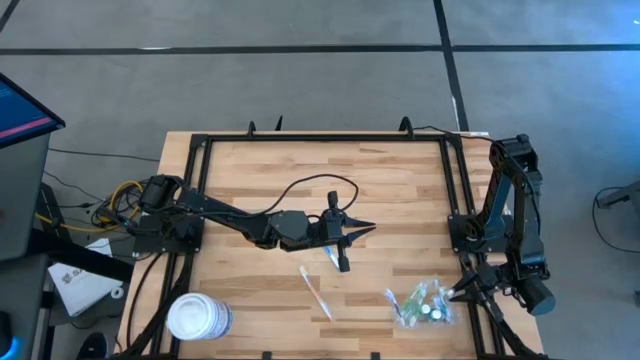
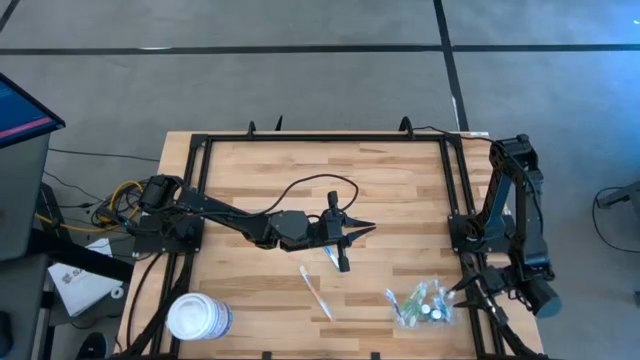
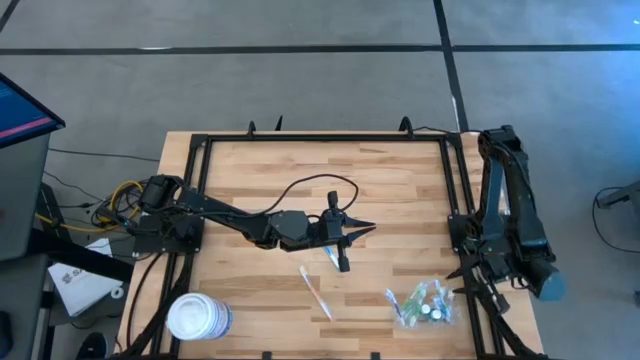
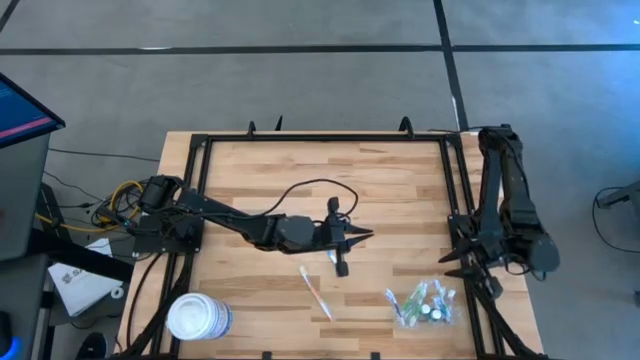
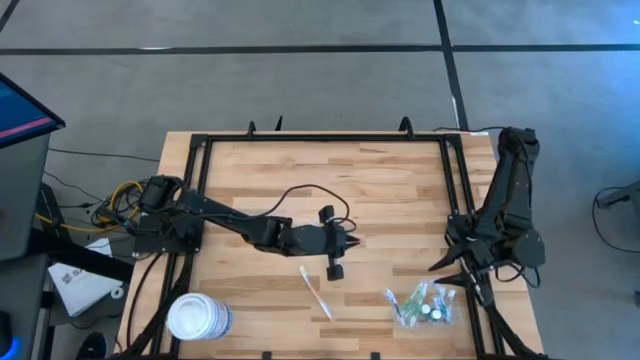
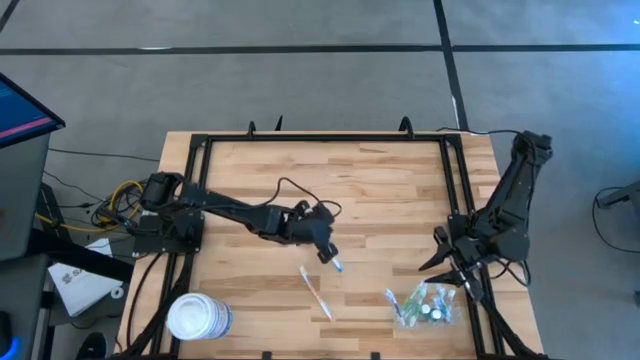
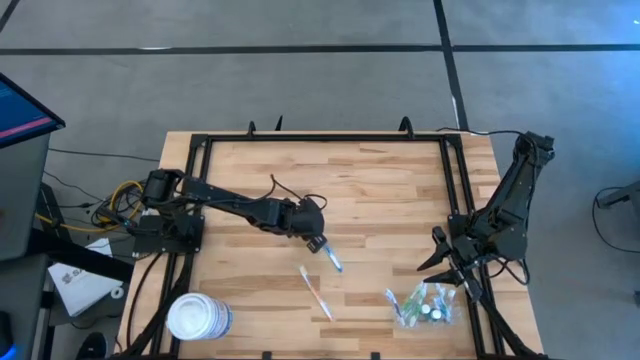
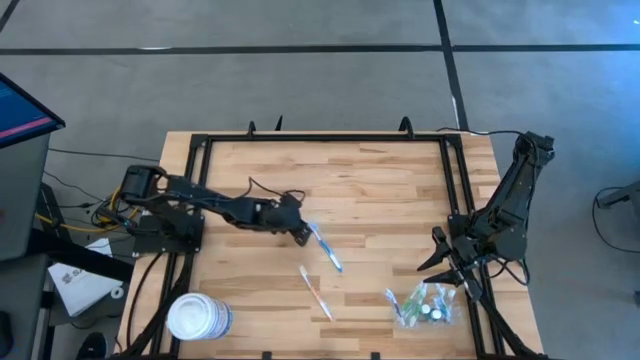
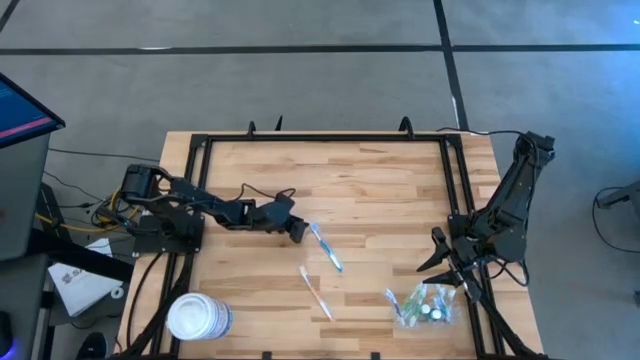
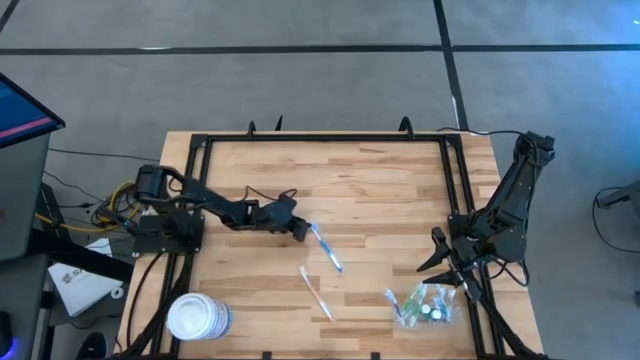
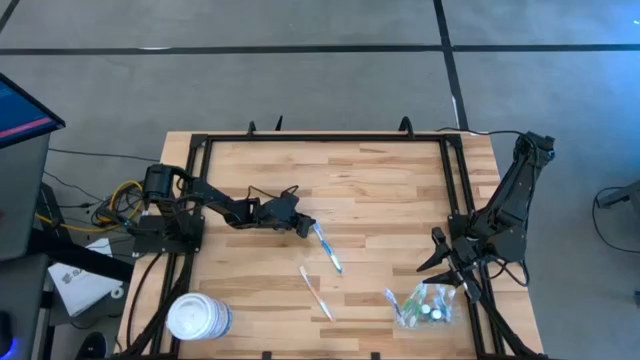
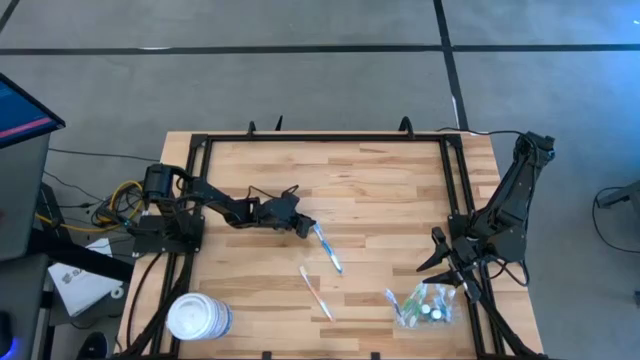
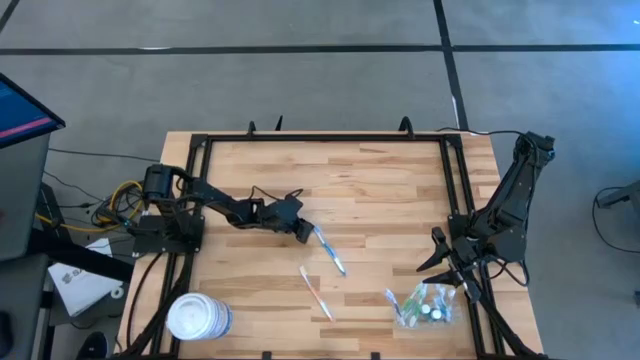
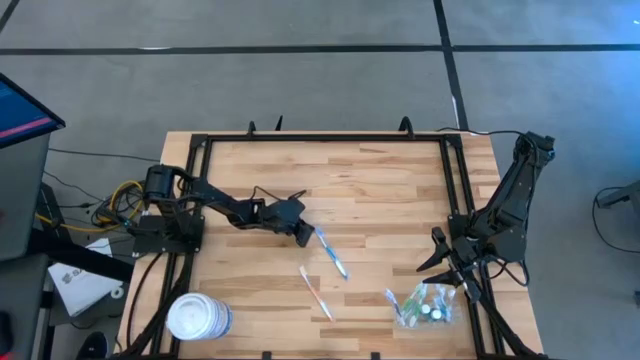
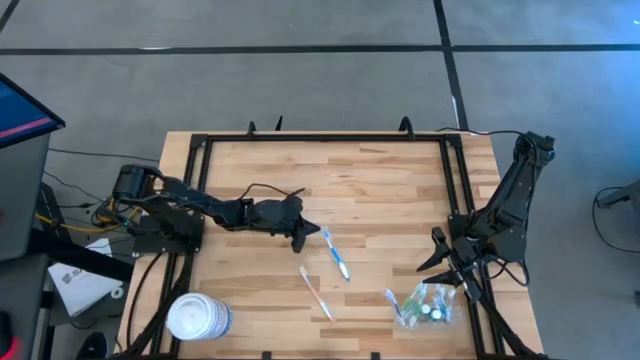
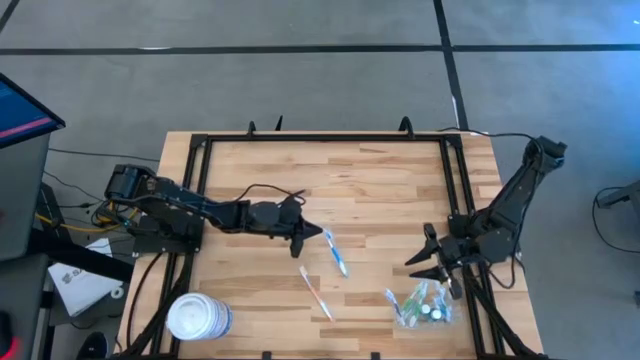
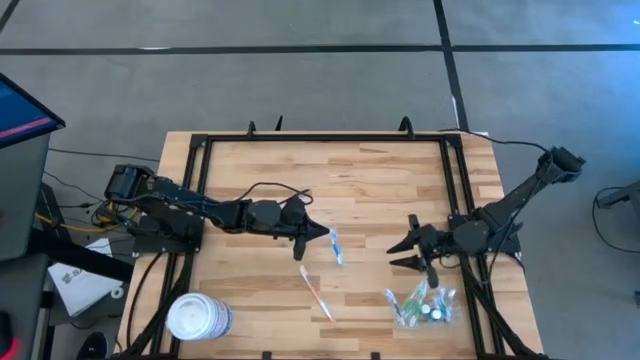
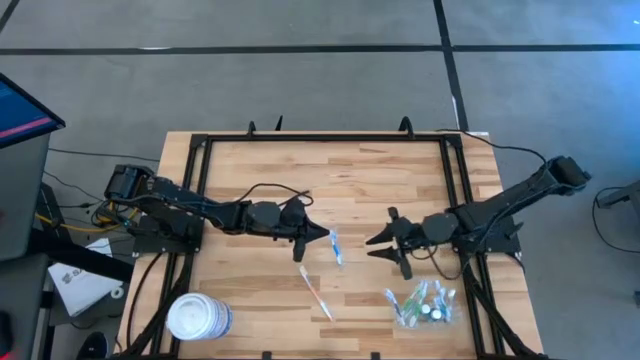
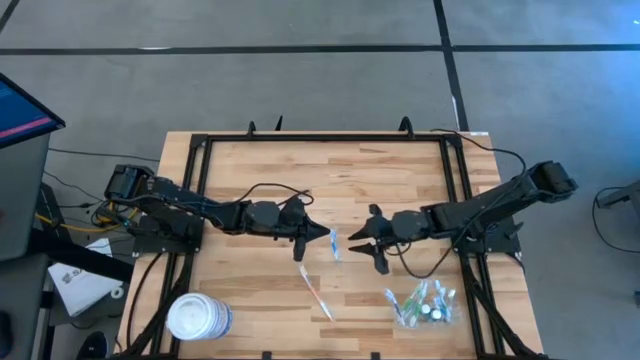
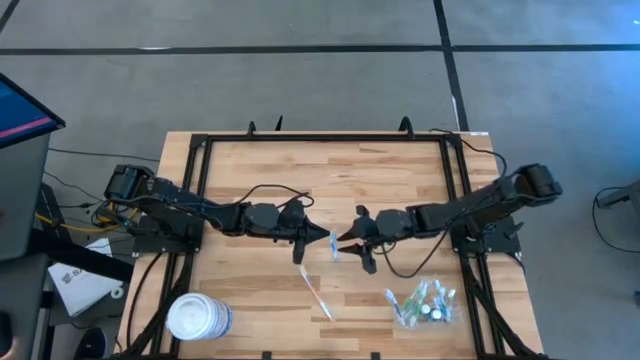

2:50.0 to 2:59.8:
Task: Pick & Place toothbrushing station
Put the blue toothbrush into the transparent organizer

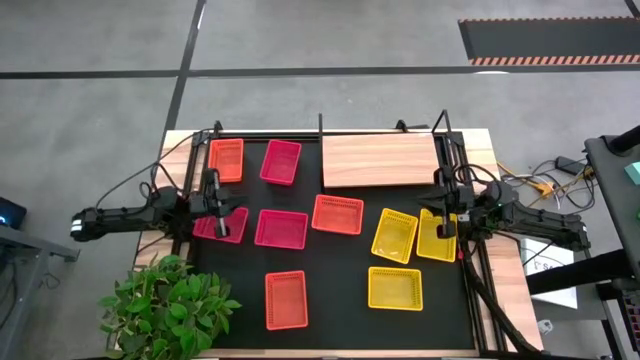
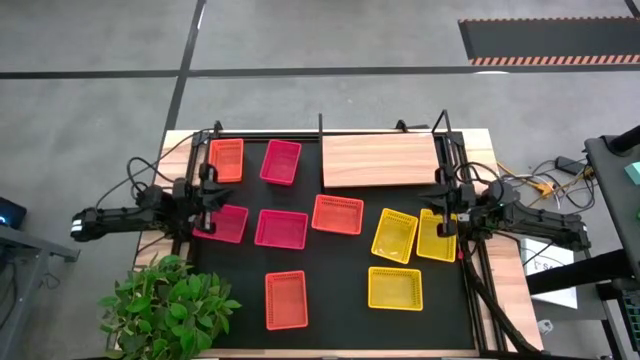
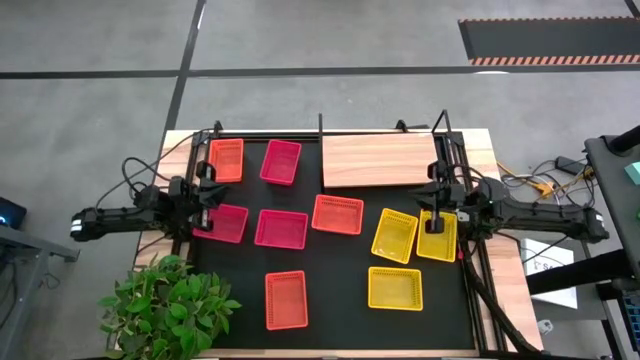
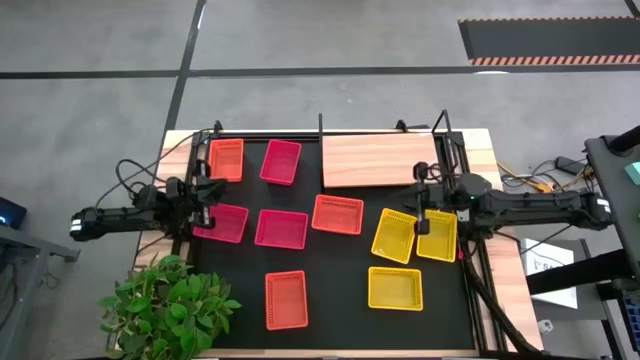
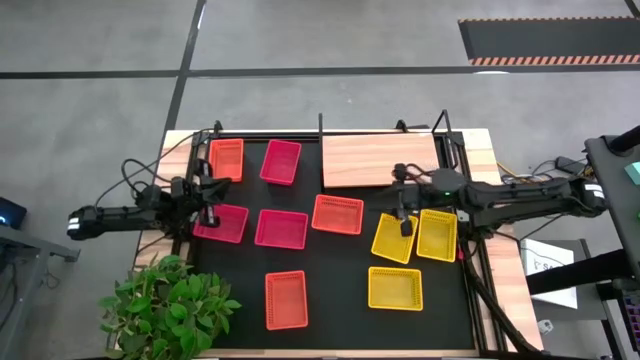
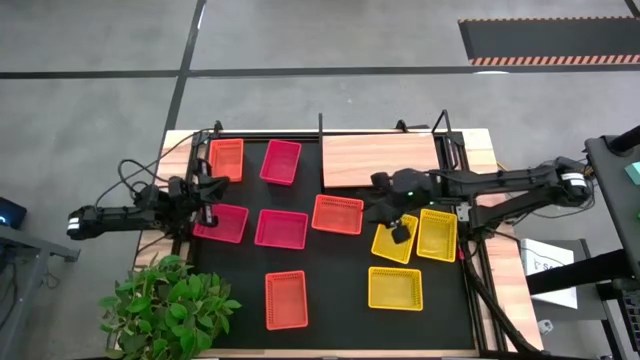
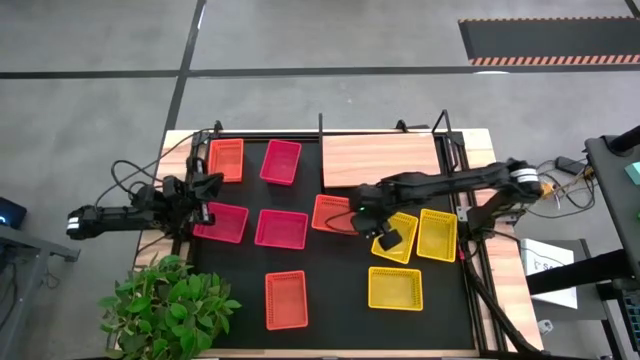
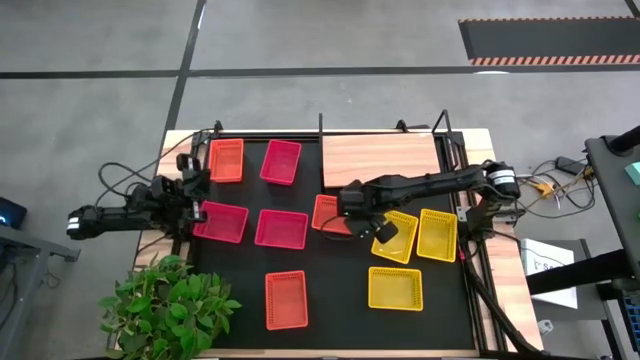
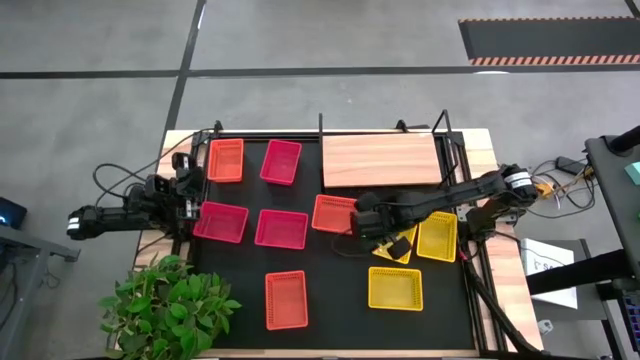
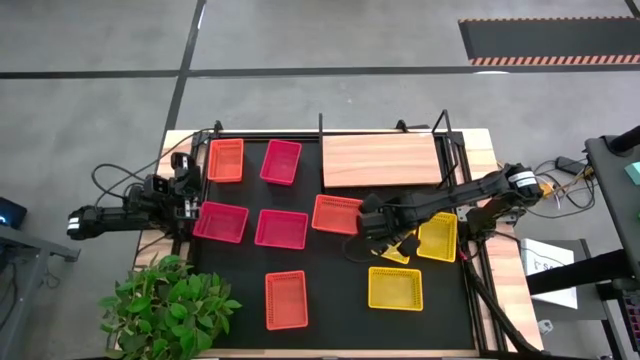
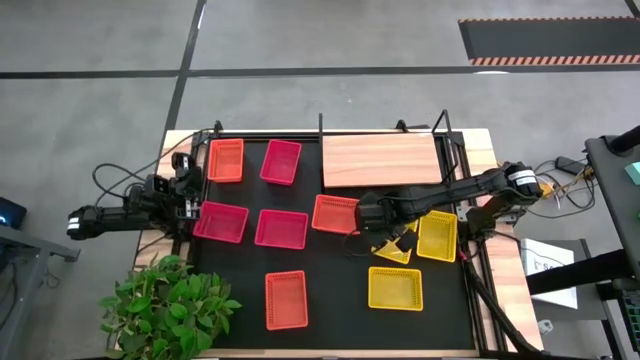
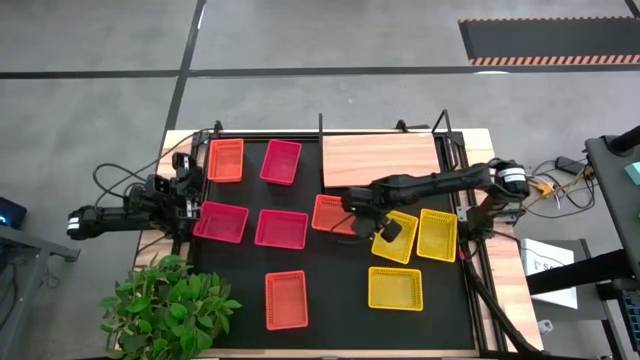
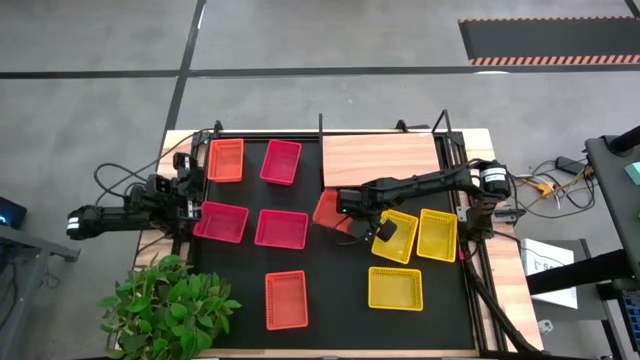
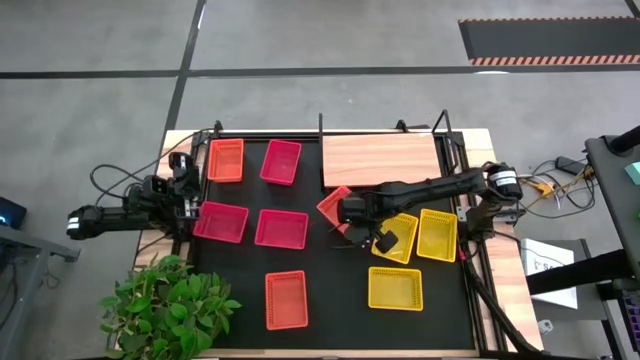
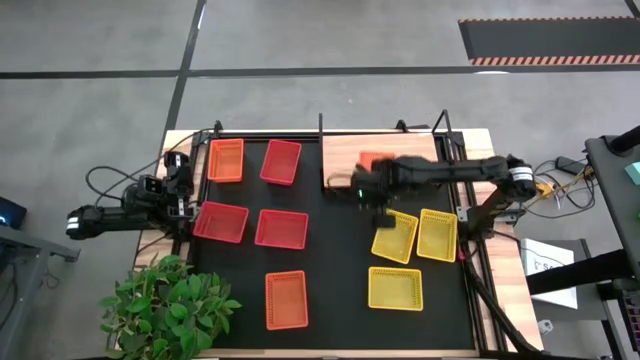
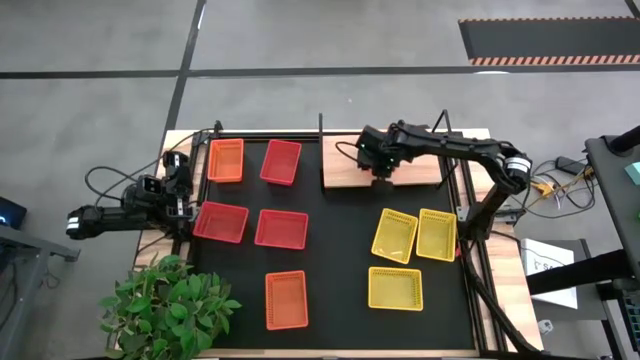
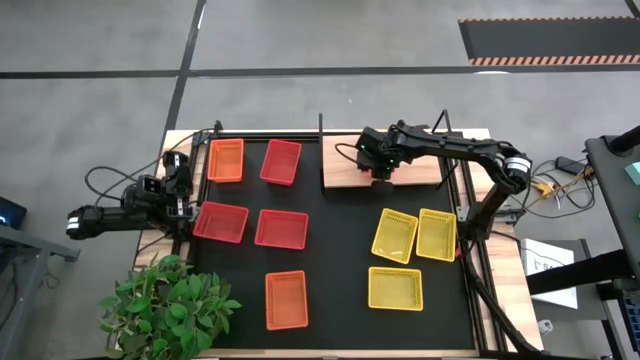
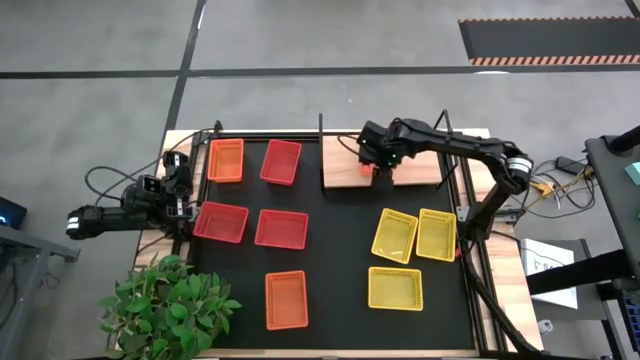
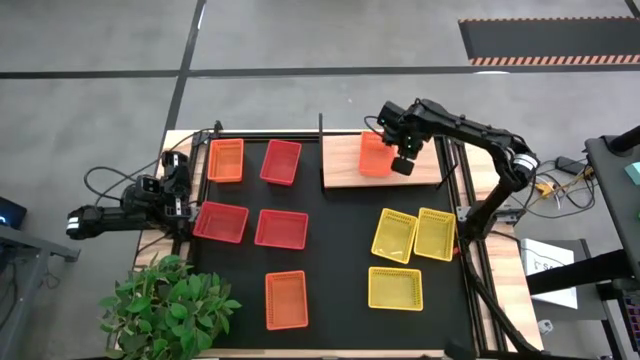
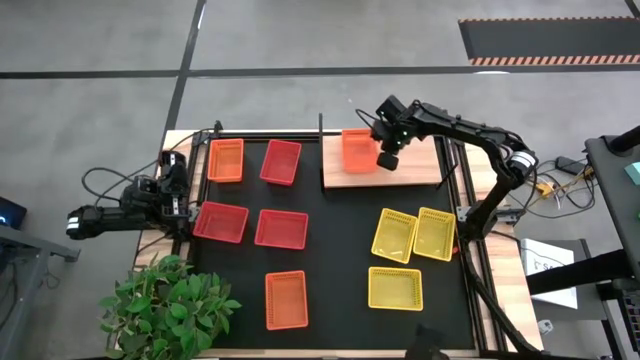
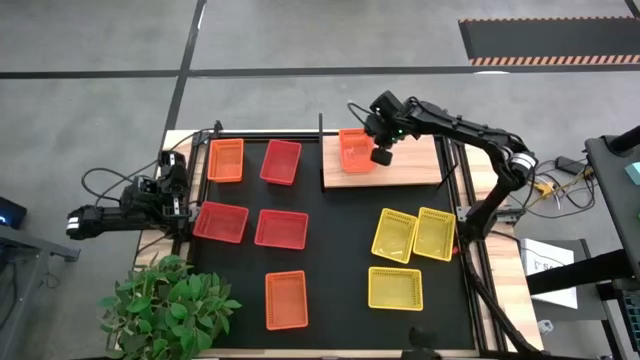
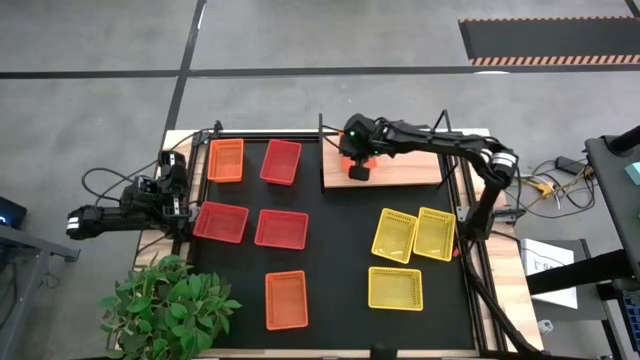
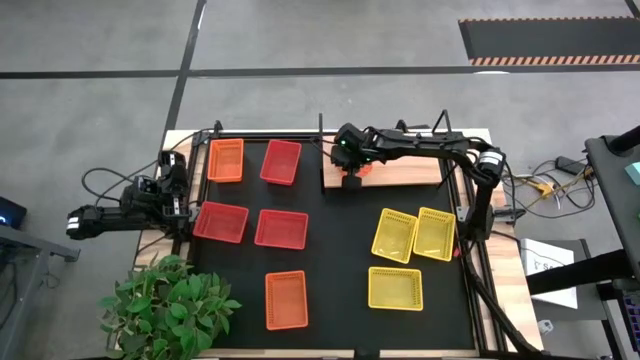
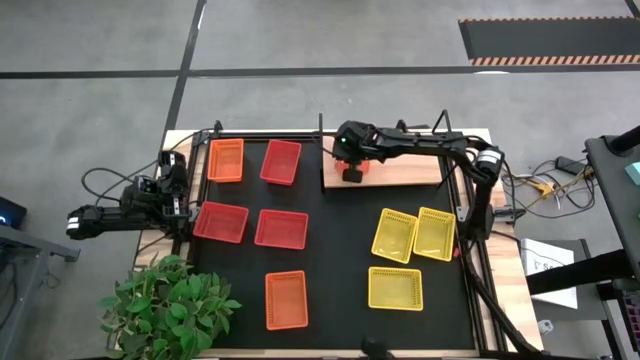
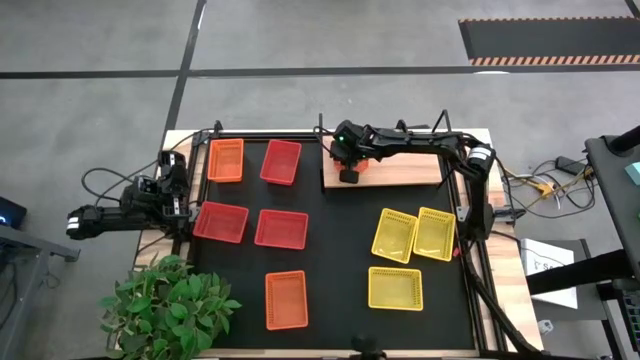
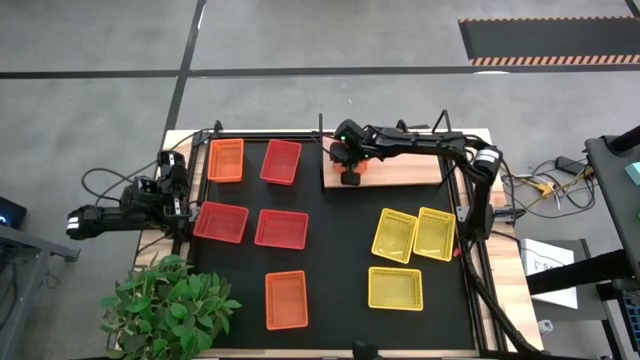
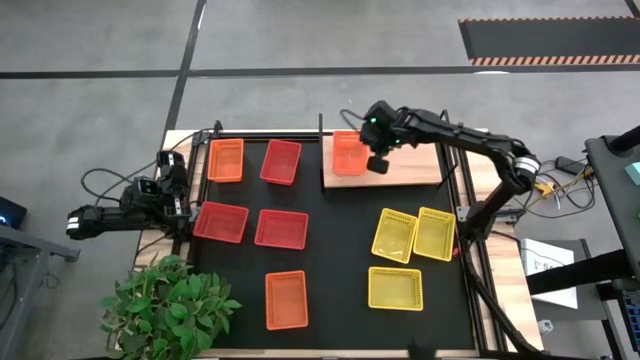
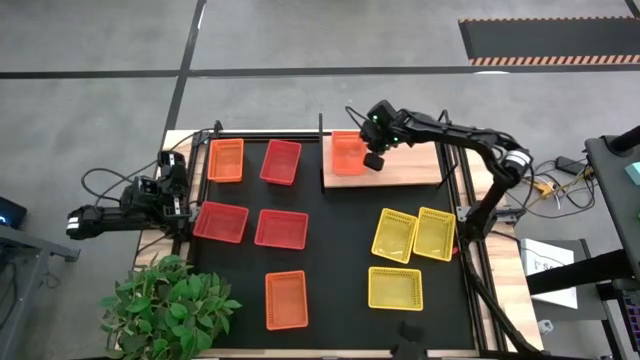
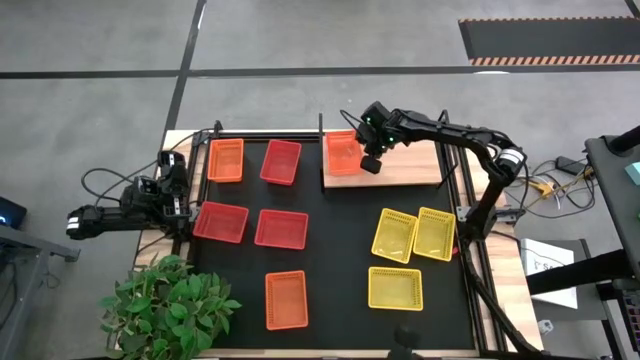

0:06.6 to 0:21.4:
Task: Stack baskets on shelf by color
Put the middle orange bin on the shelf
